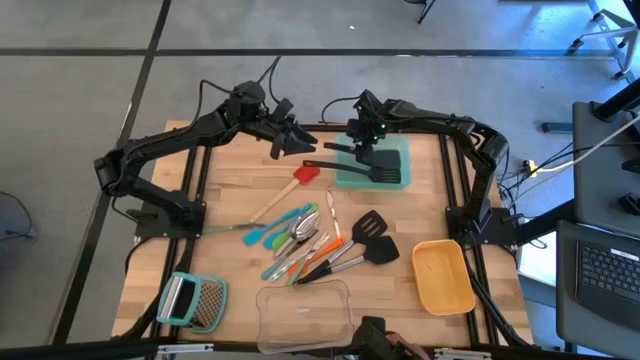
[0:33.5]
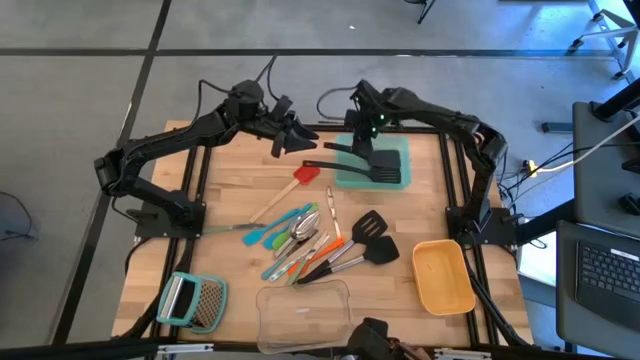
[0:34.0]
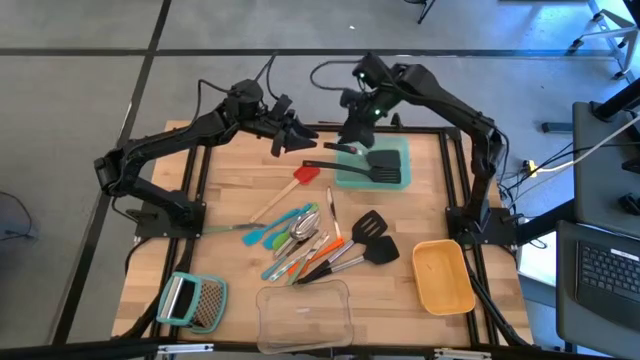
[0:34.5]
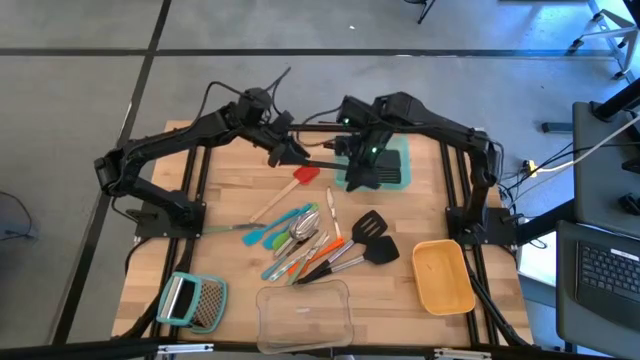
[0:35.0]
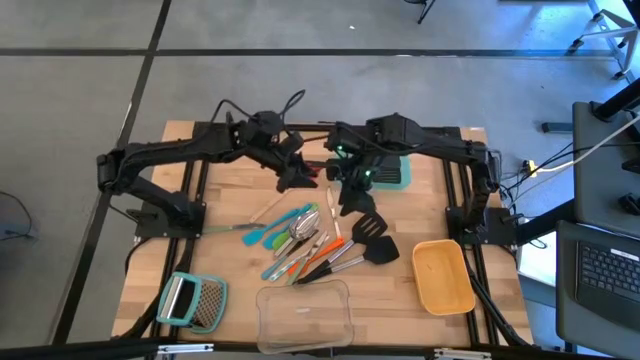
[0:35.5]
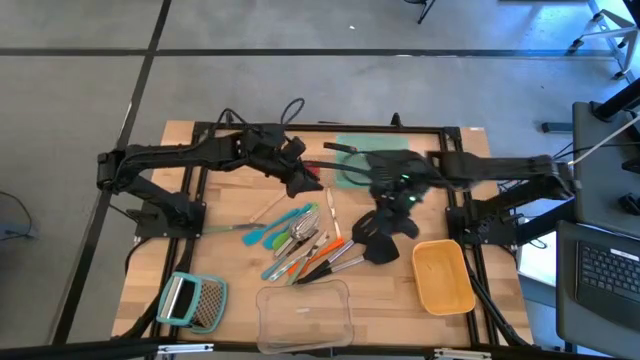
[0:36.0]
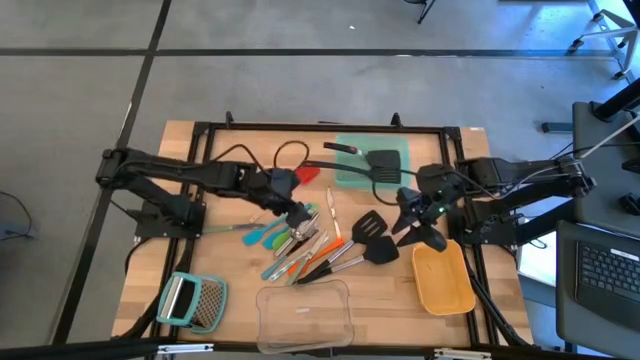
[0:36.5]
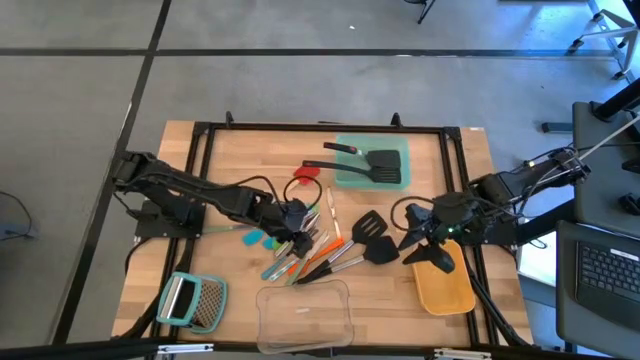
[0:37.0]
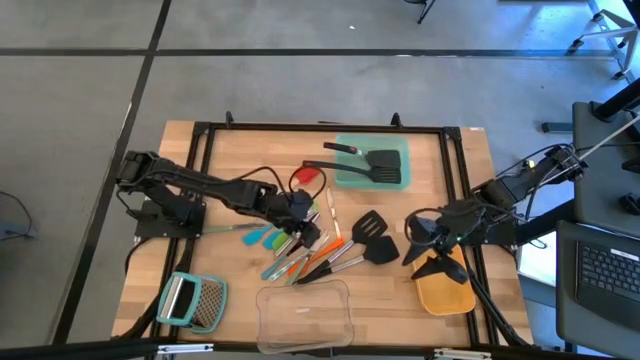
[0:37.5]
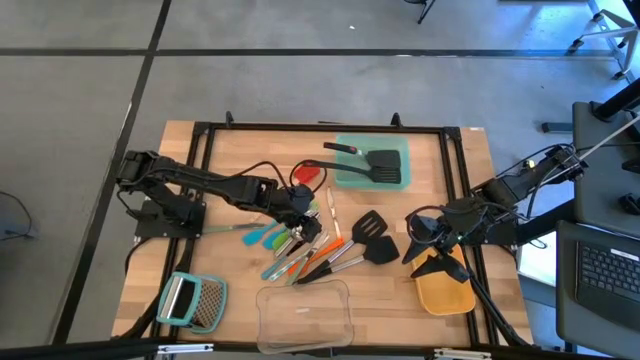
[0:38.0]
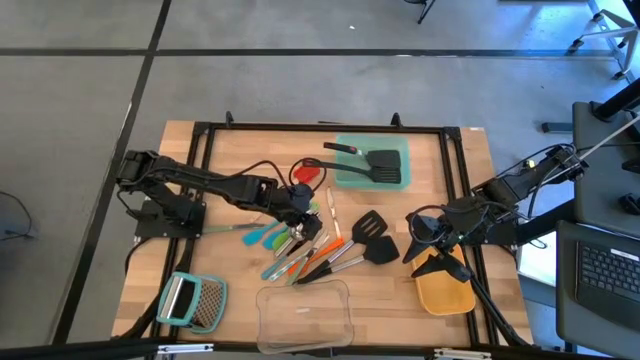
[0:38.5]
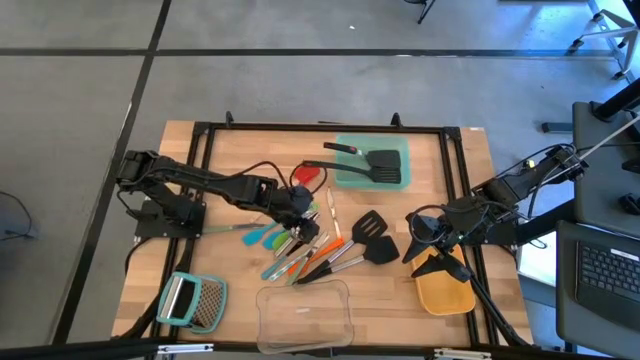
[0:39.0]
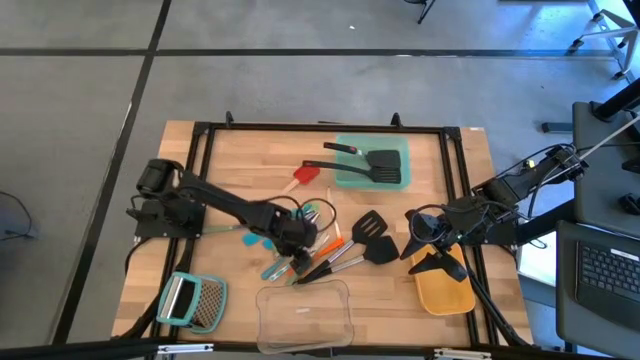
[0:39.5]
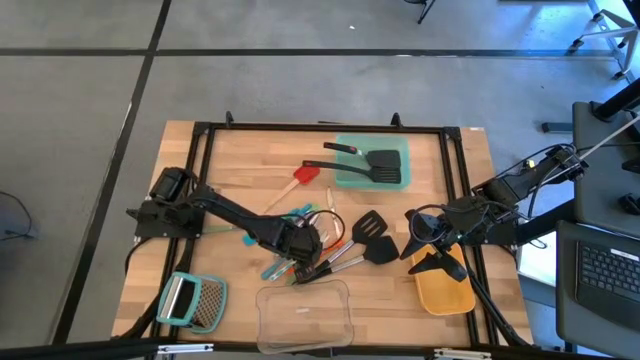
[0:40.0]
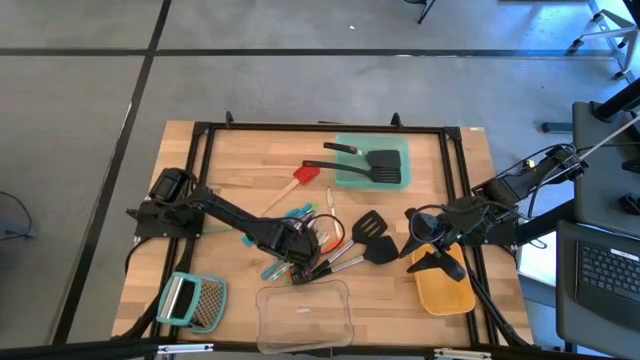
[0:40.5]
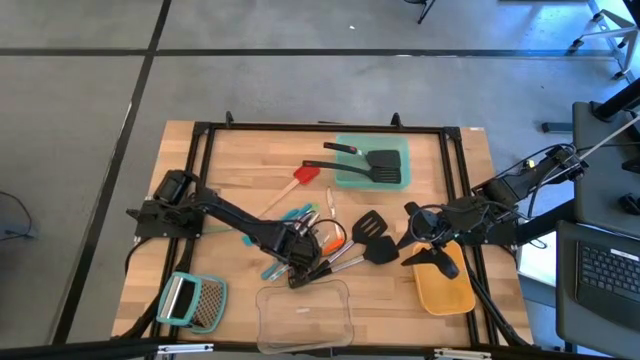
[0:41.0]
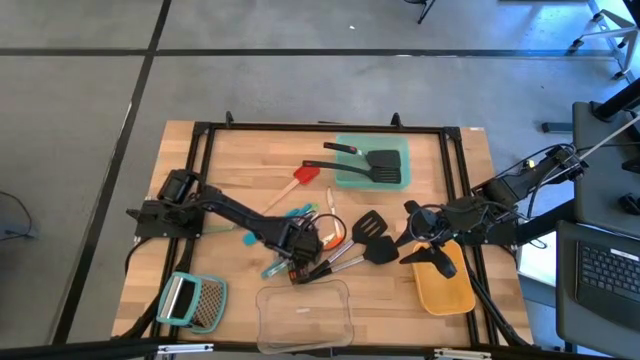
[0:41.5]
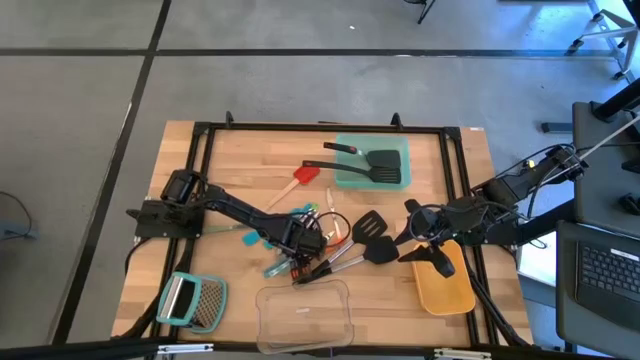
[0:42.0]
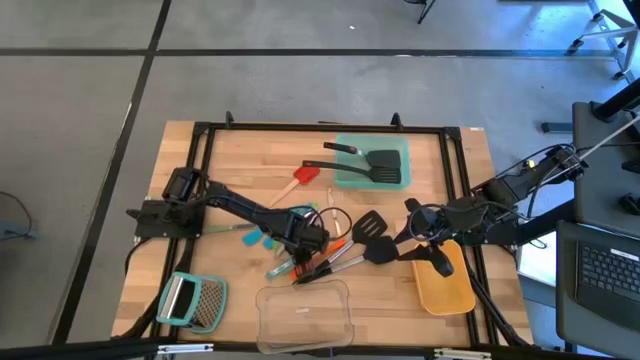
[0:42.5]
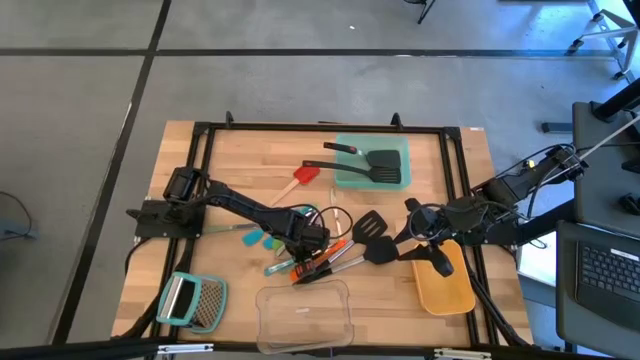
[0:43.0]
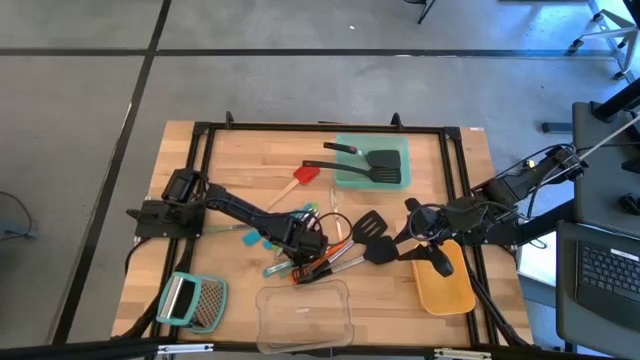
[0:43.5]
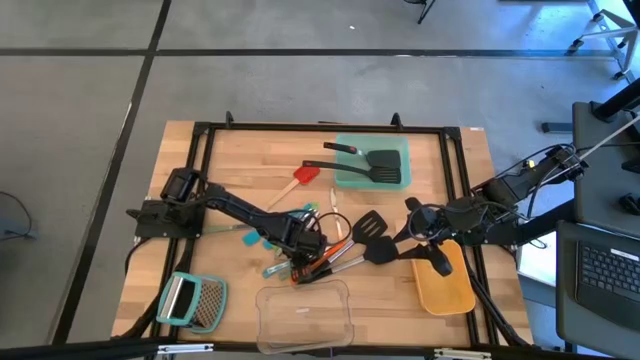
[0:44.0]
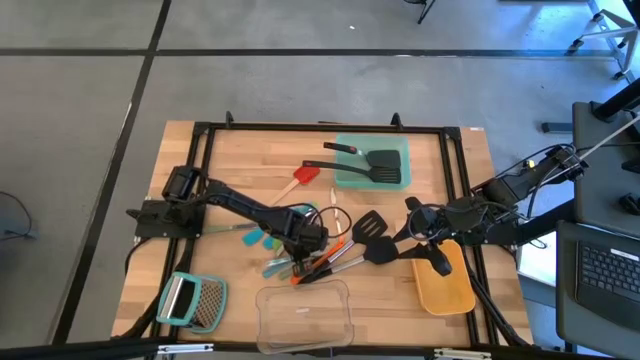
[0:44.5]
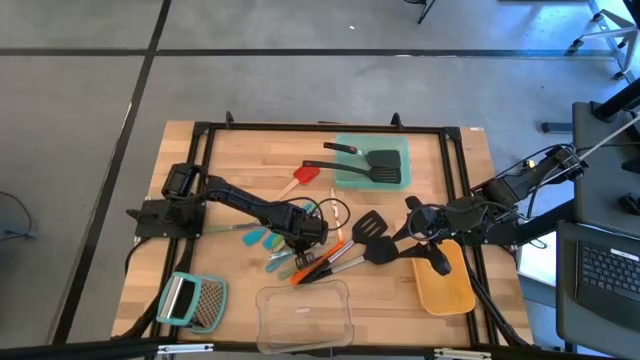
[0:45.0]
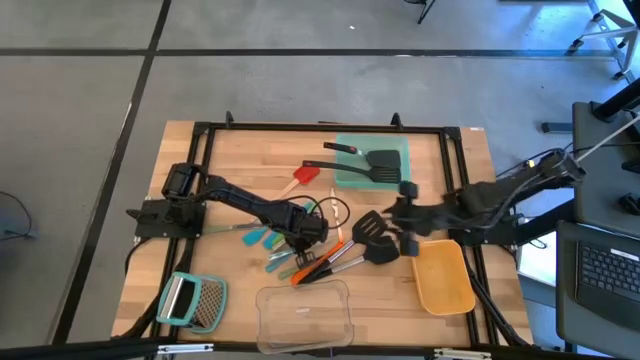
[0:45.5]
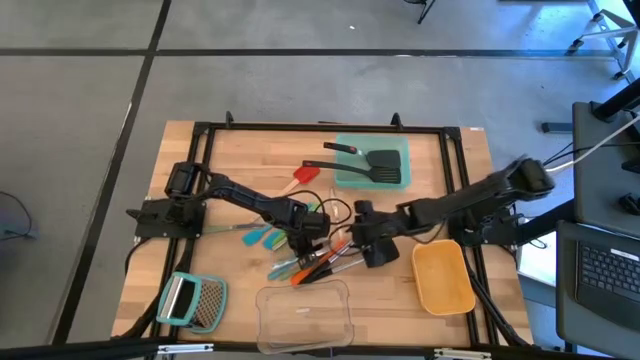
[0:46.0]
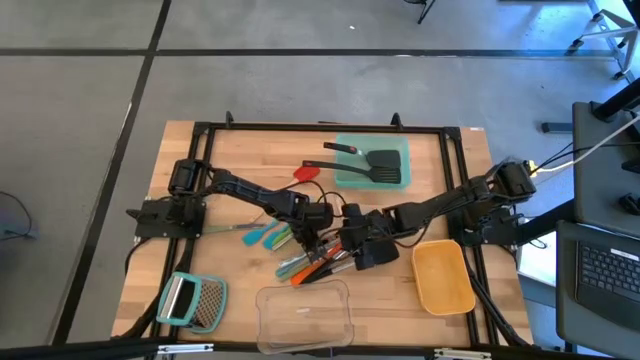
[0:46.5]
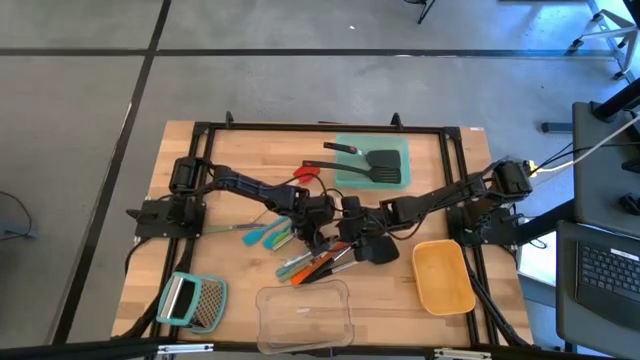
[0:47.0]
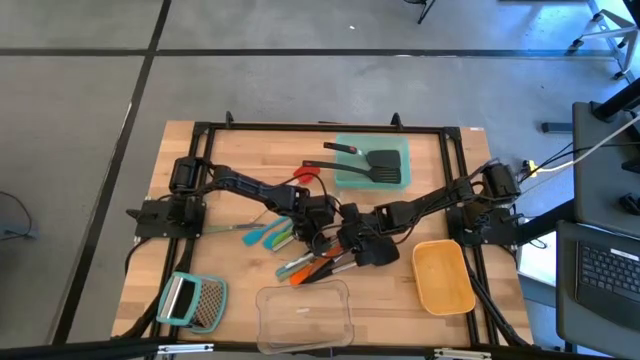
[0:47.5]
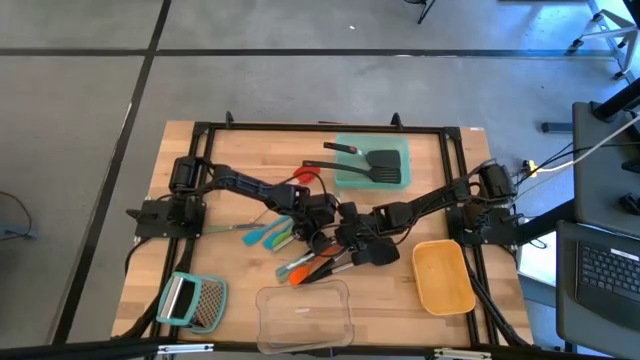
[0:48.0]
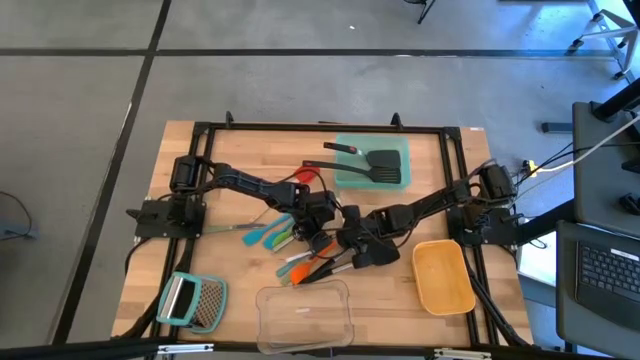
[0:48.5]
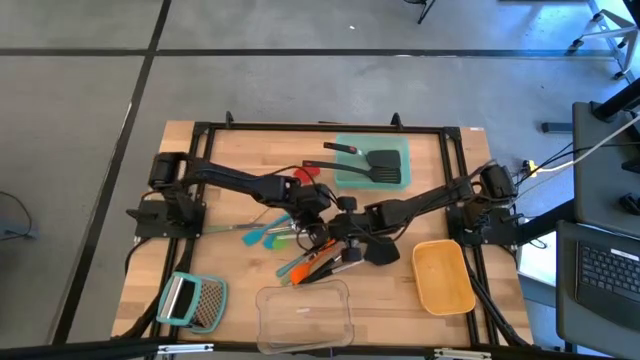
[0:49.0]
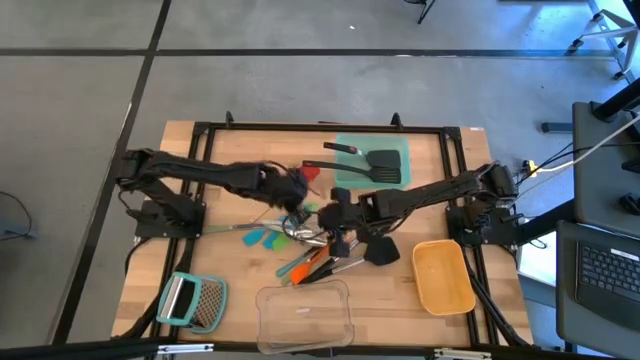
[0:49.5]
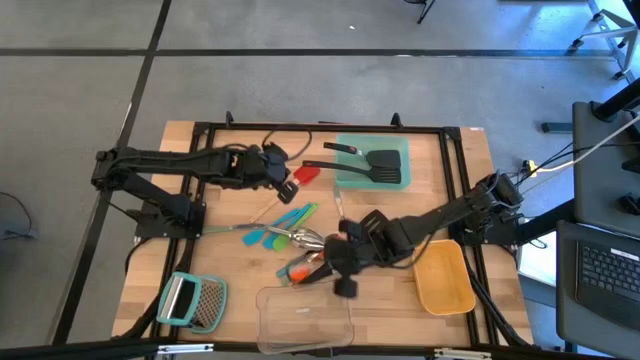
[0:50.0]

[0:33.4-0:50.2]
Task: Pick & Place Kitchen Items
Put the blue table knife into the transparent bin

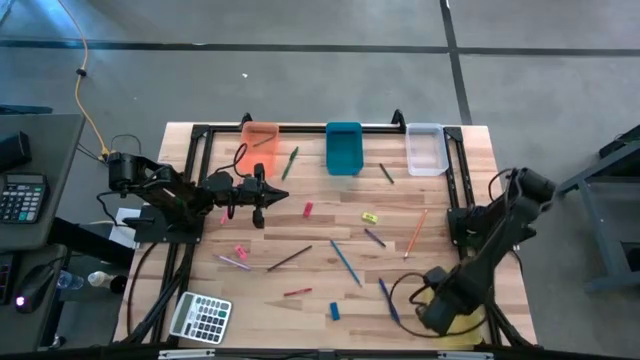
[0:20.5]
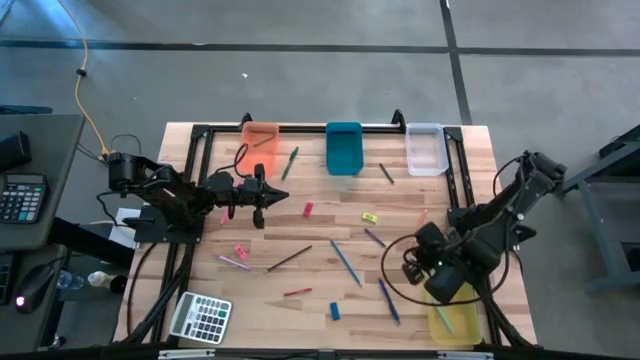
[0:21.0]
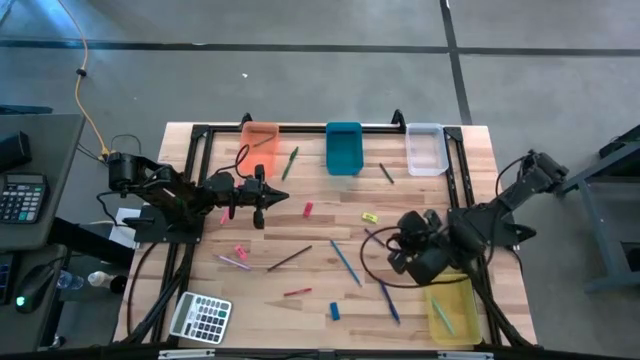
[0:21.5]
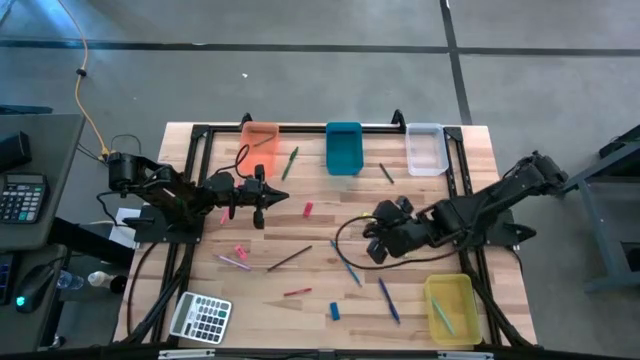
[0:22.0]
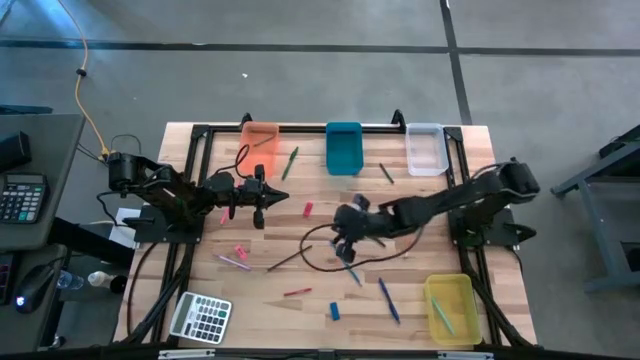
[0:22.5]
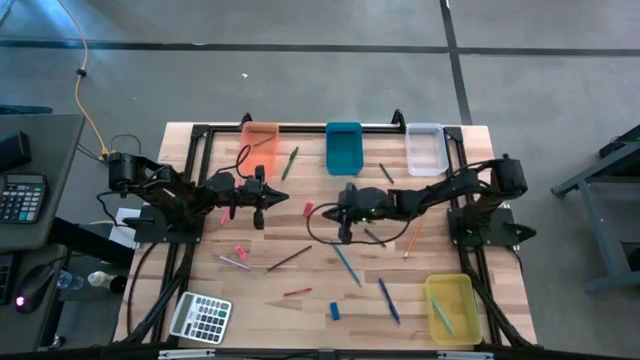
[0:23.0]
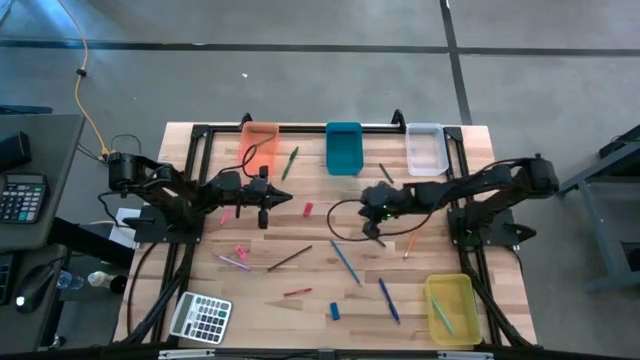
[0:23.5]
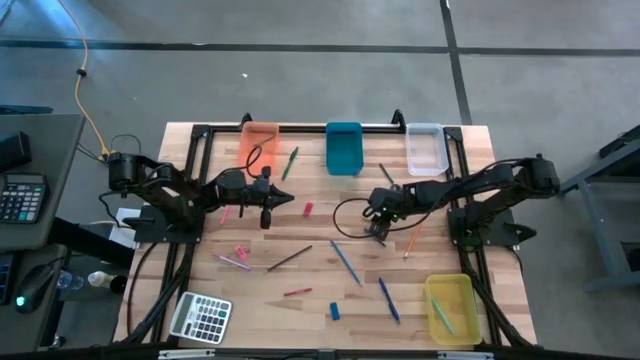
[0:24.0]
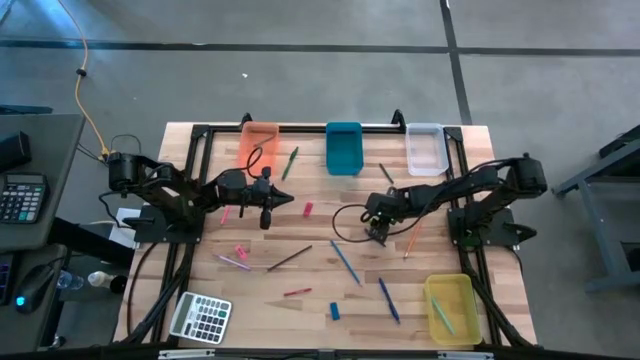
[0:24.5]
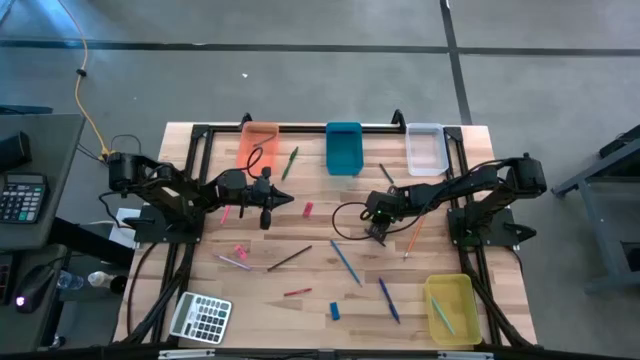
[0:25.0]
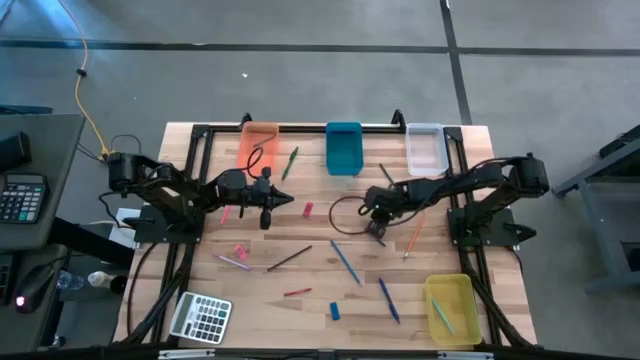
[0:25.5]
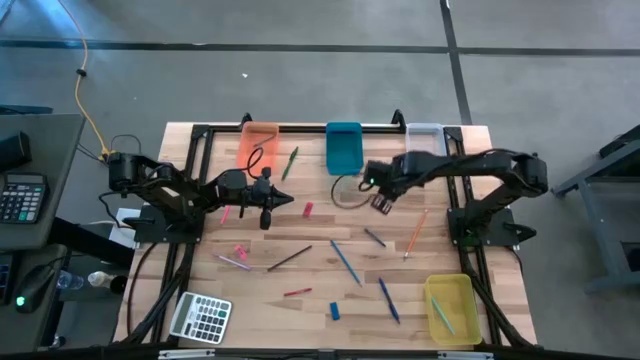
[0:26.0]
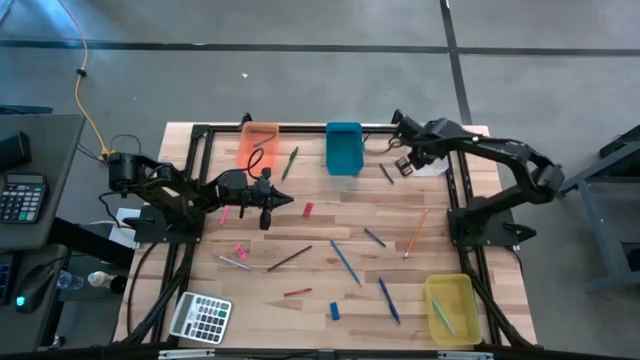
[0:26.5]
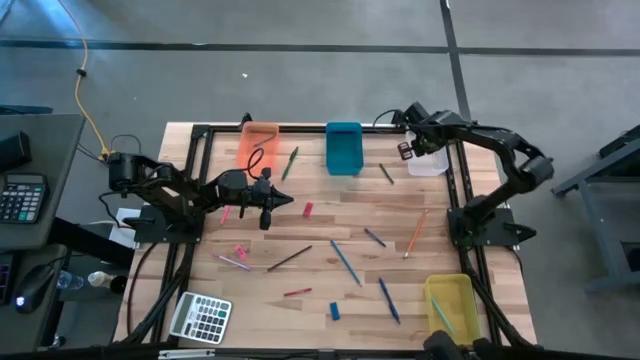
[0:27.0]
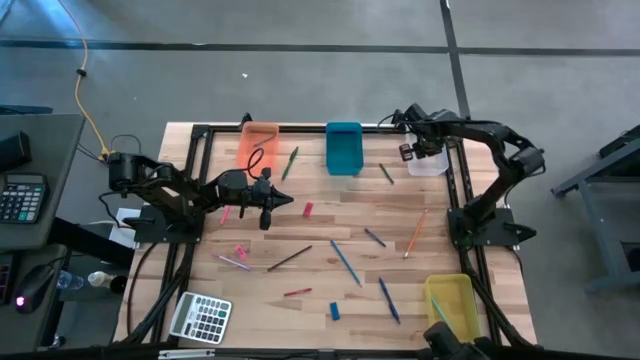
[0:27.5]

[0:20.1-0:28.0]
Task: Sort crayons/erasers/pens/pencils in bins
Put the yellow eraser into the transparent bin
